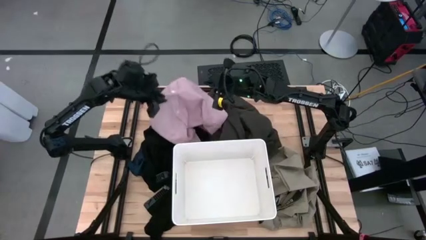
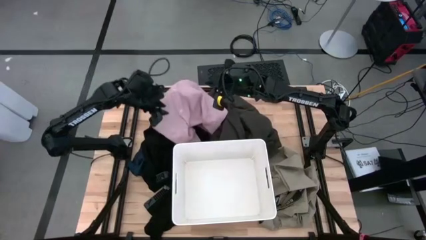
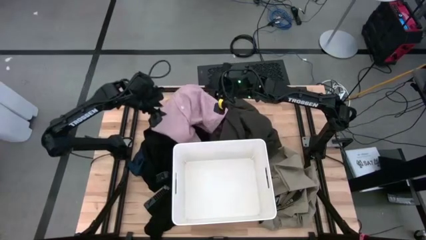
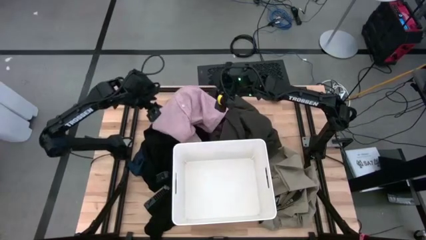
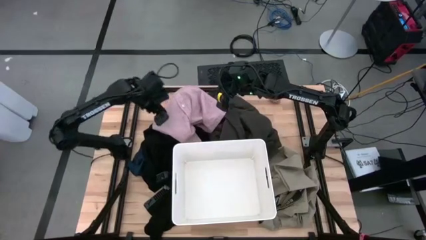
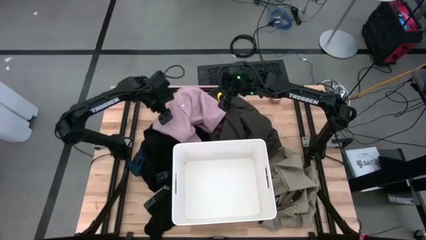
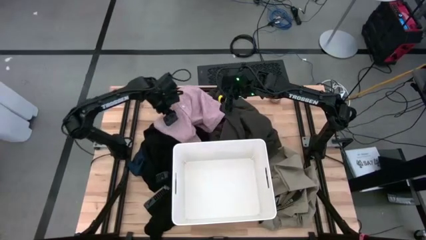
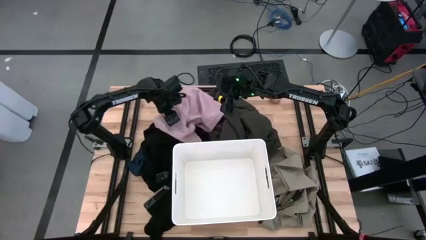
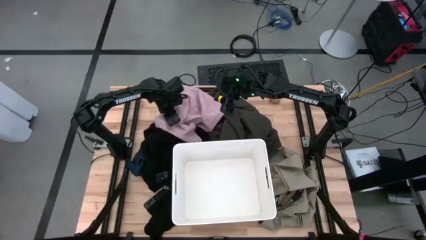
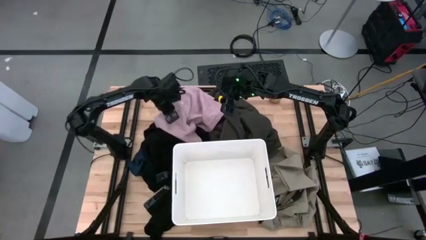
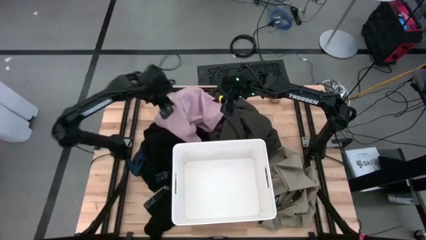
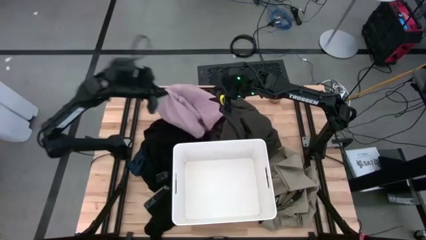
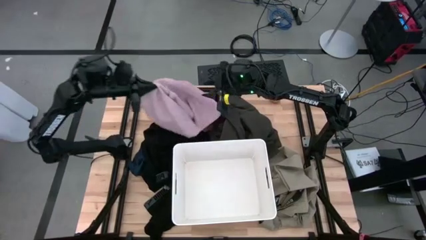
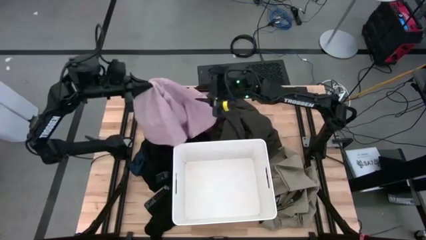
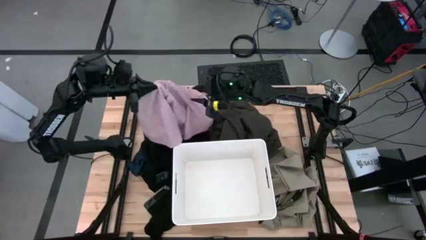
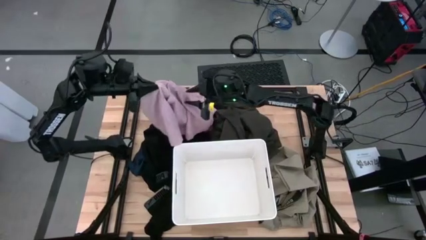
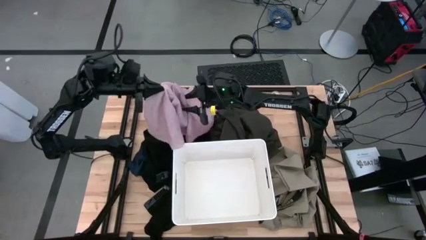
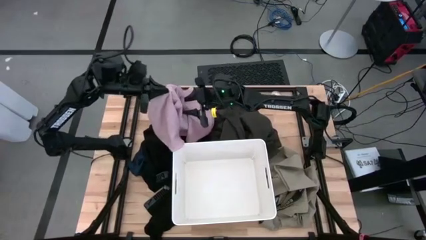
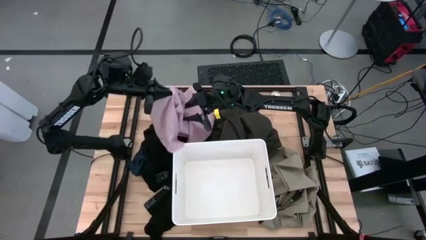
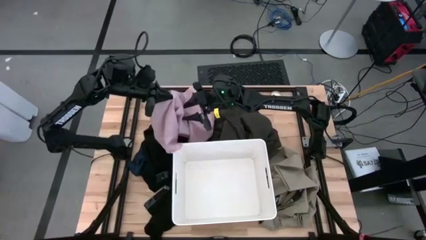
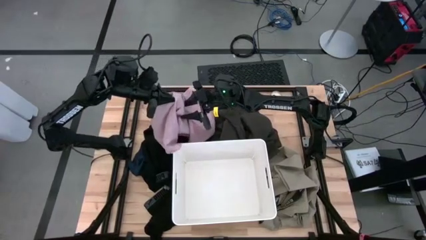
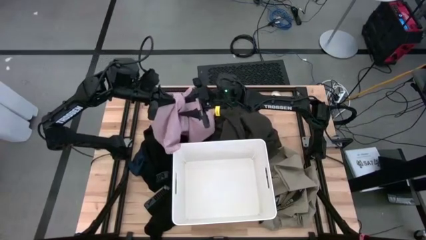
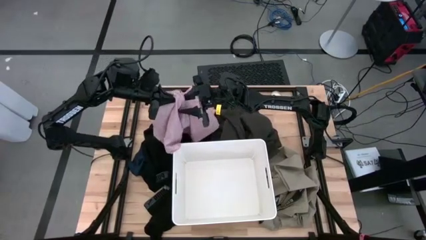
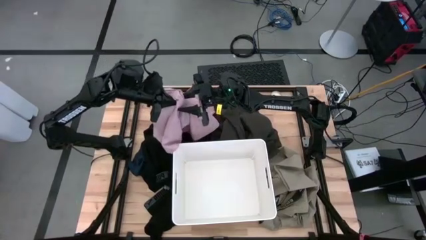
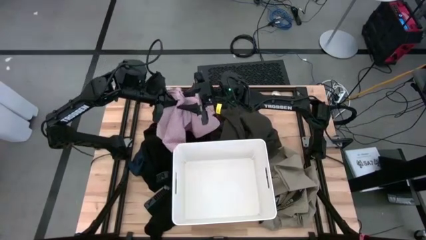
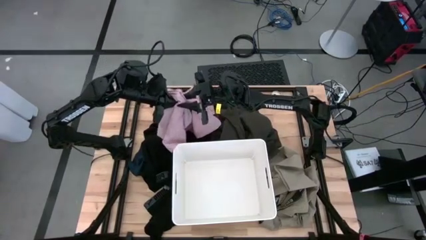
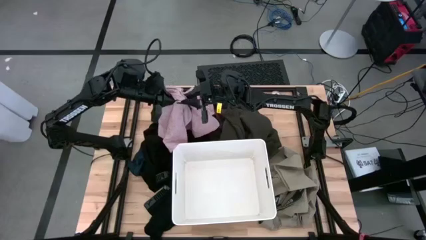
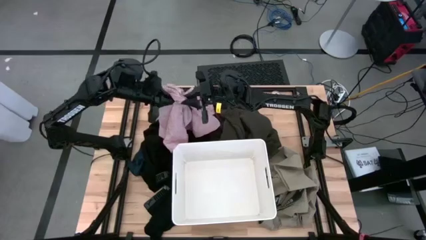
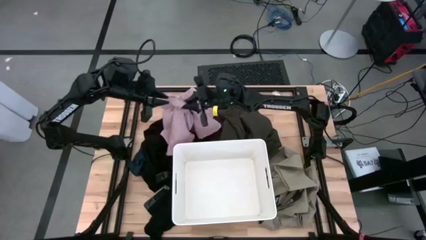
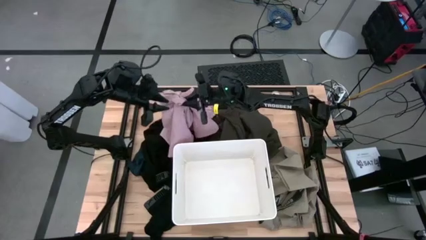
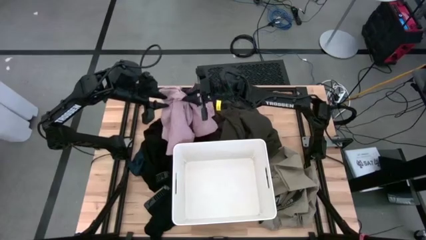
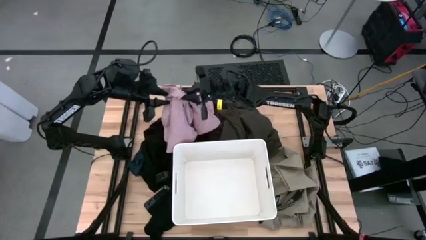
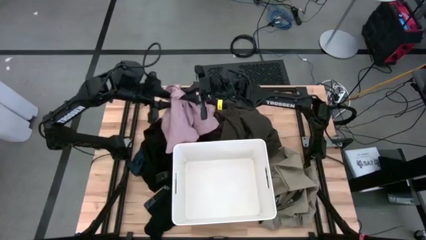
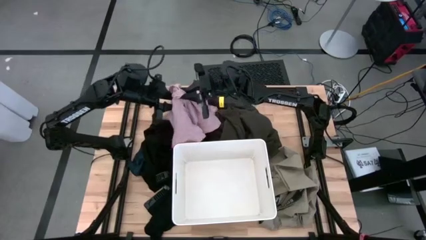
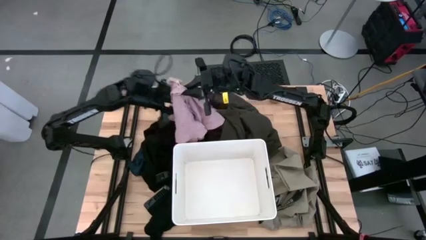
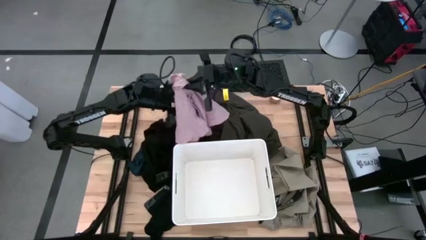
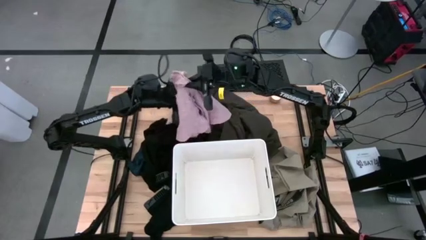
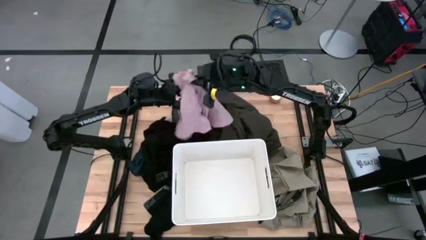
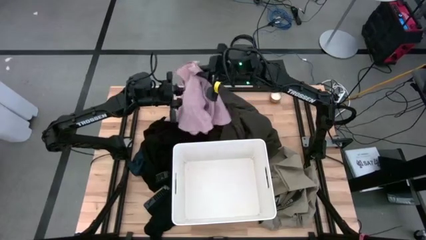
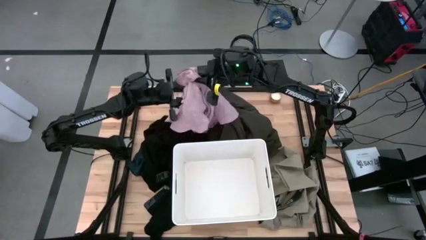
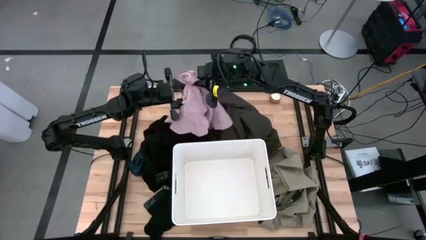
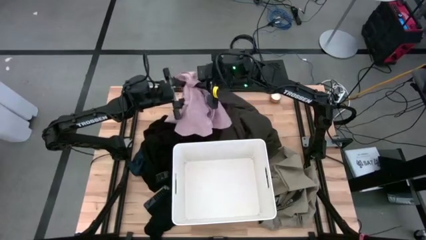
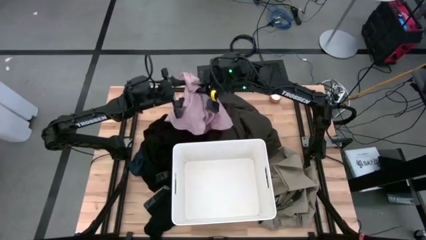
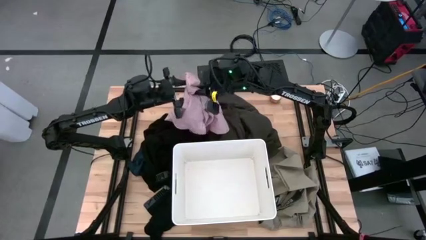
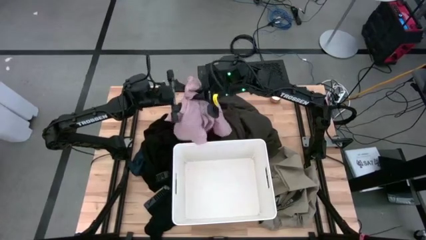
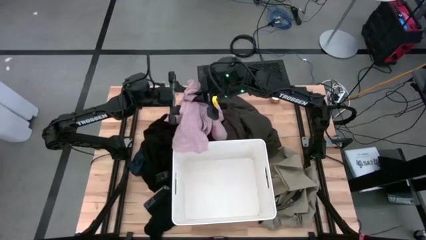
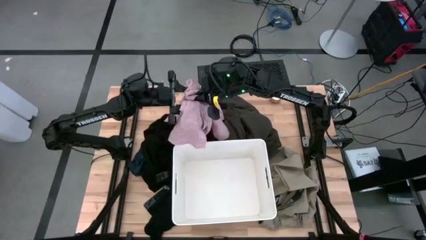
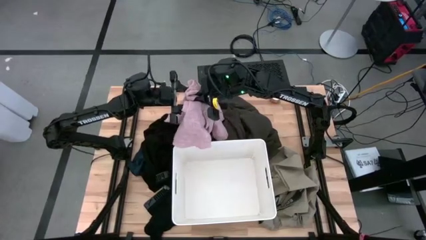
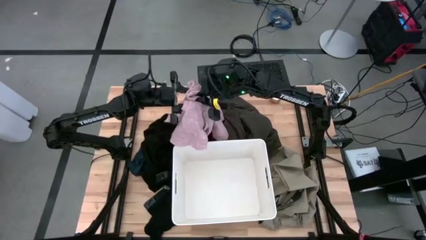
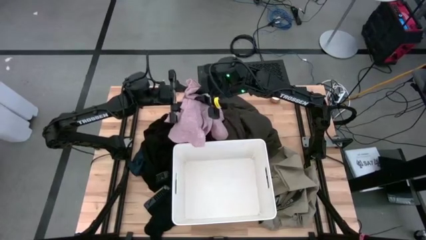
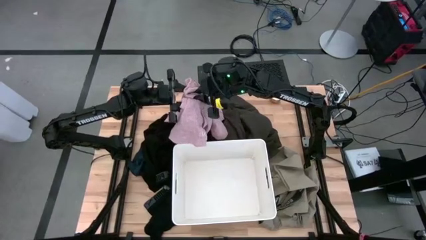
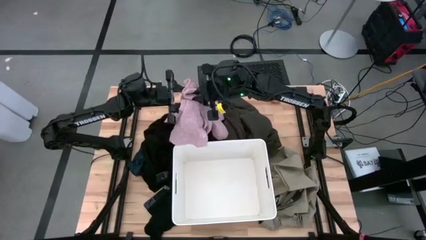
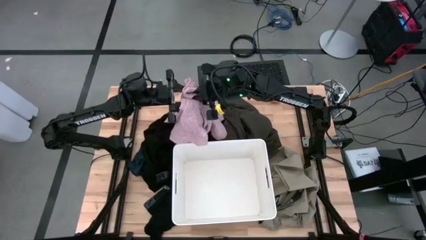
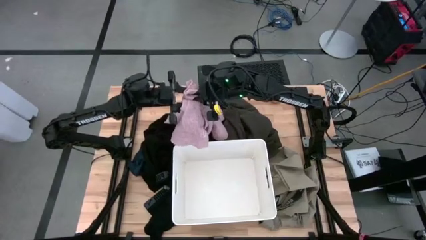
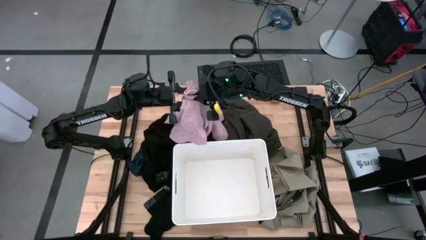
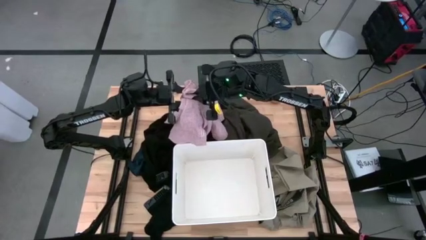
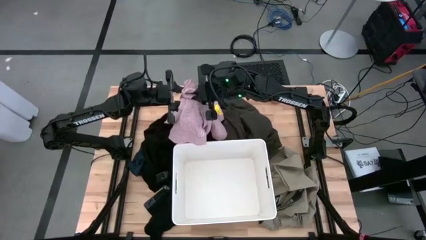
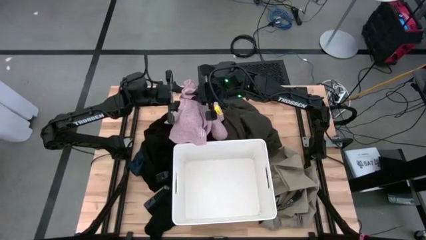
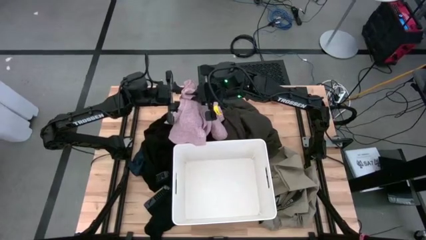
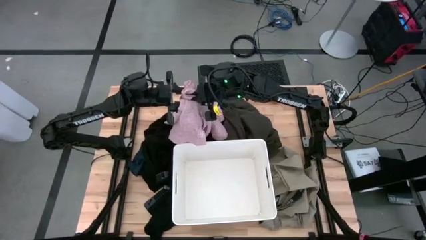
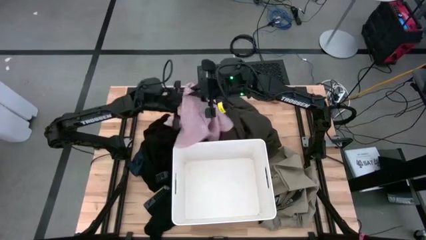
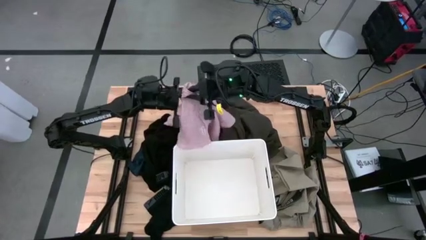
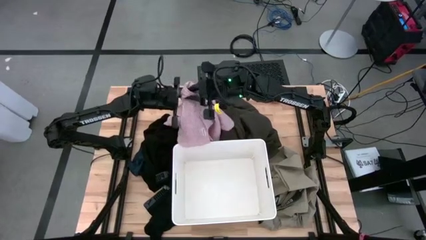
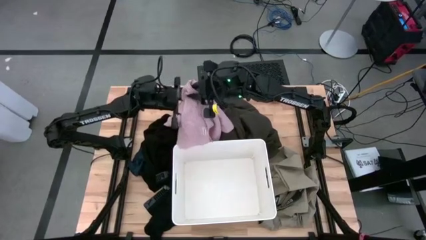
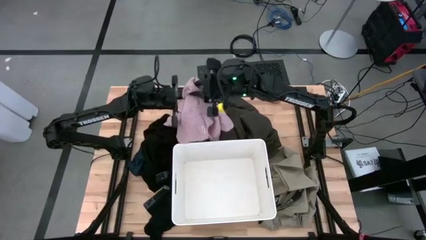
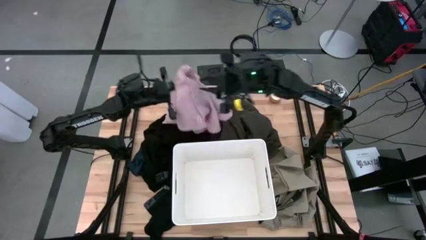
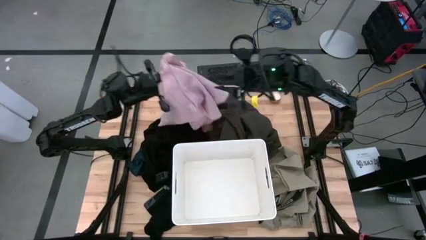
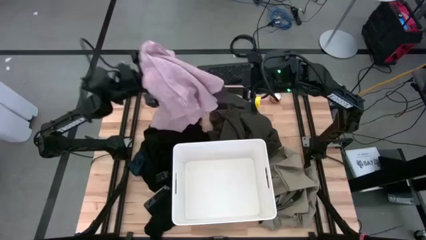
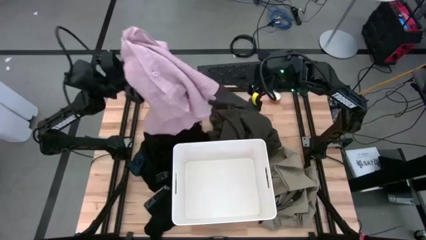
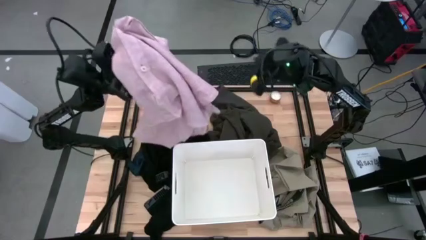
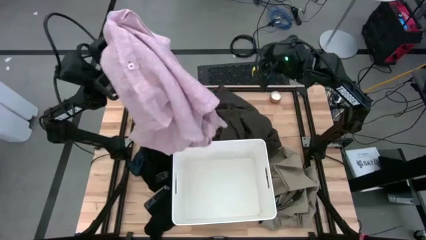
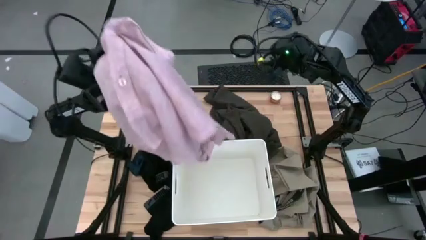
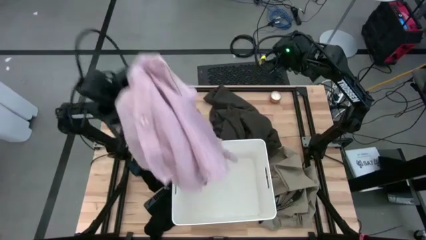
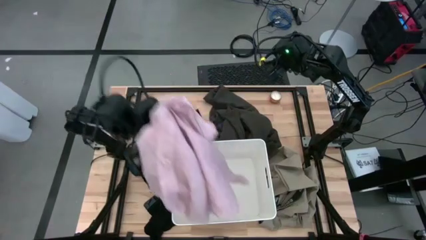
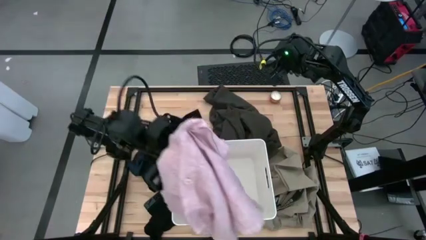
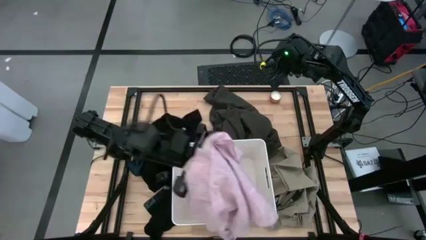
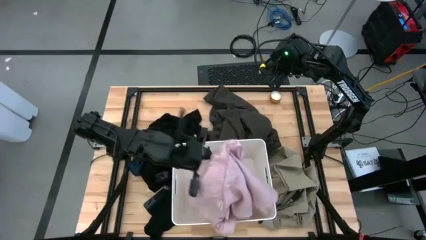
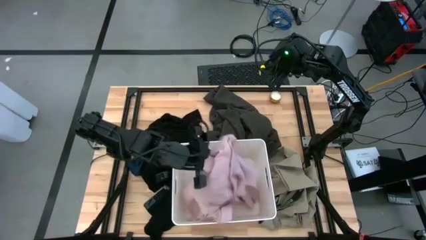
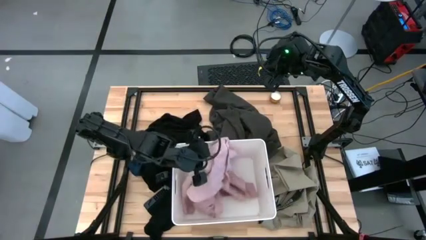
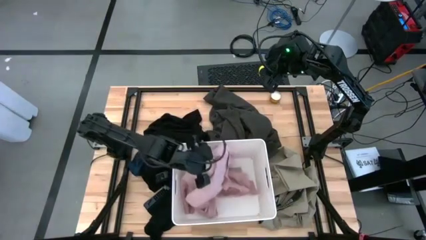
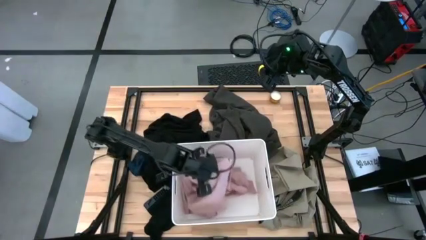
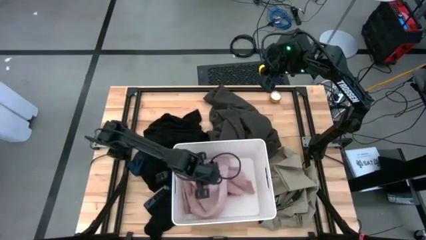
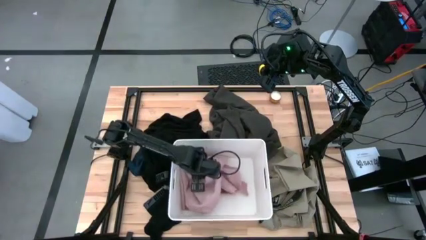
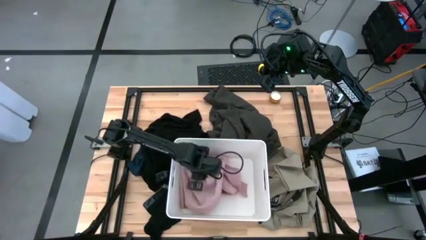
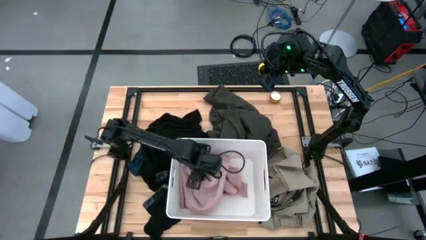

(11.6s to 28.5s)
Task: Sort clothes
Put the pink polo shirt into the white bin
